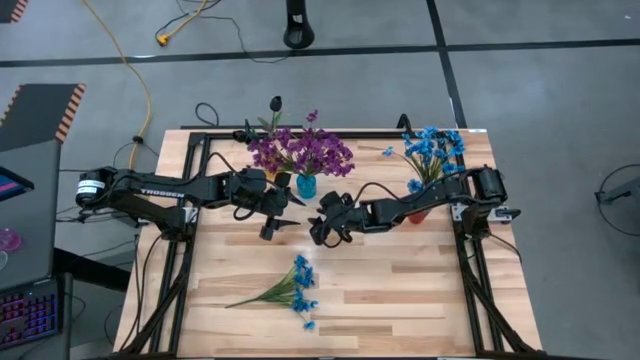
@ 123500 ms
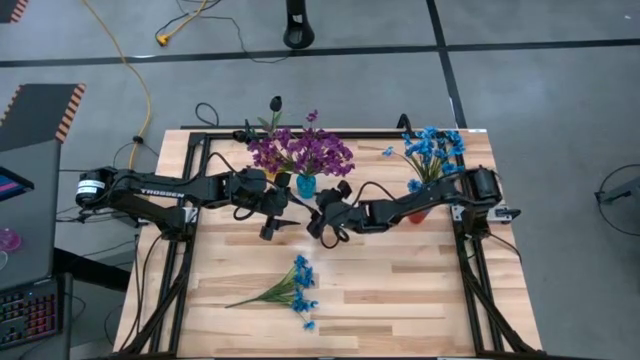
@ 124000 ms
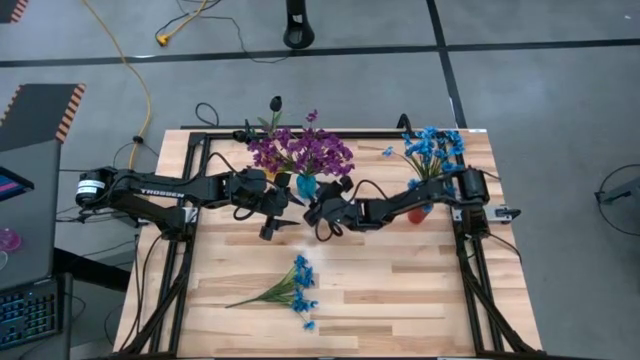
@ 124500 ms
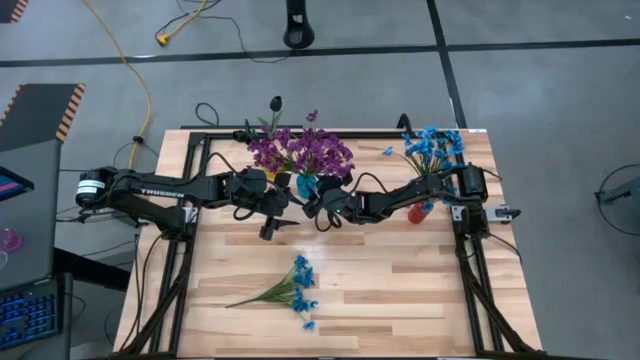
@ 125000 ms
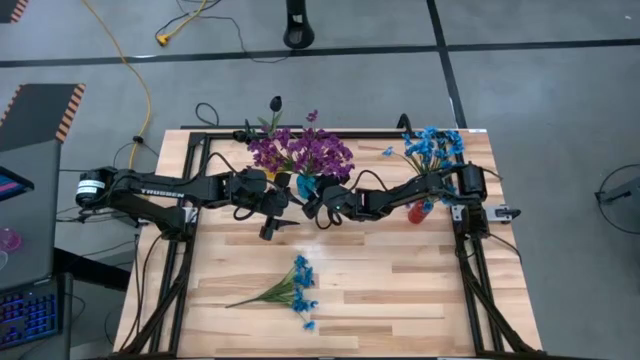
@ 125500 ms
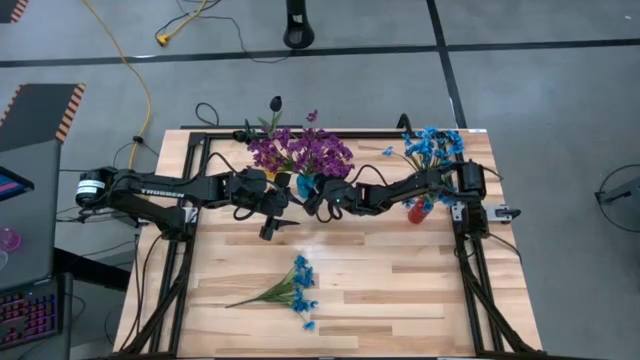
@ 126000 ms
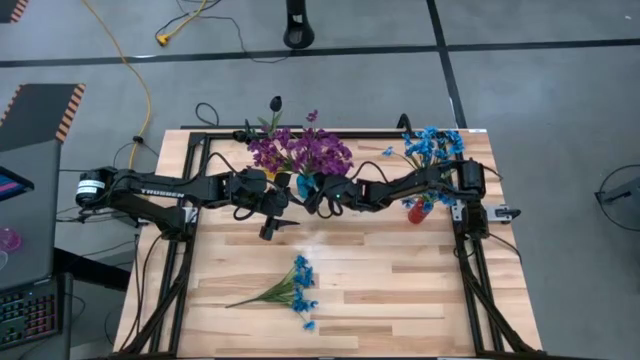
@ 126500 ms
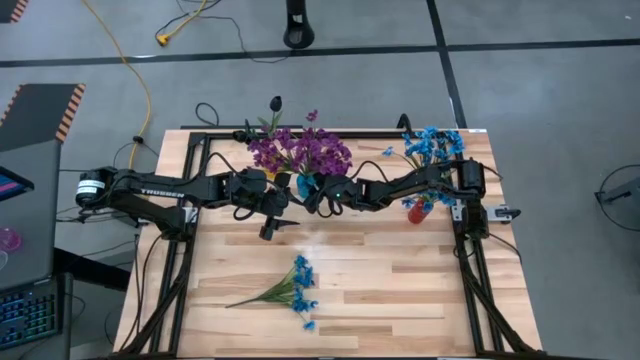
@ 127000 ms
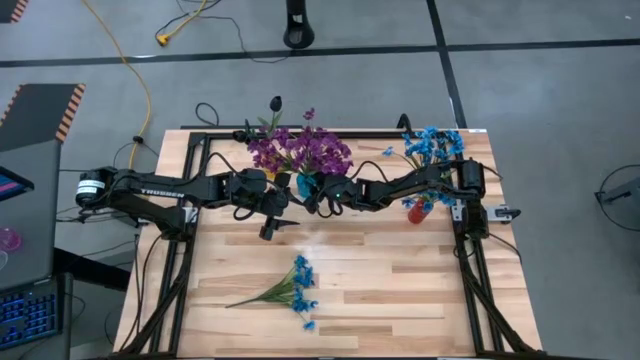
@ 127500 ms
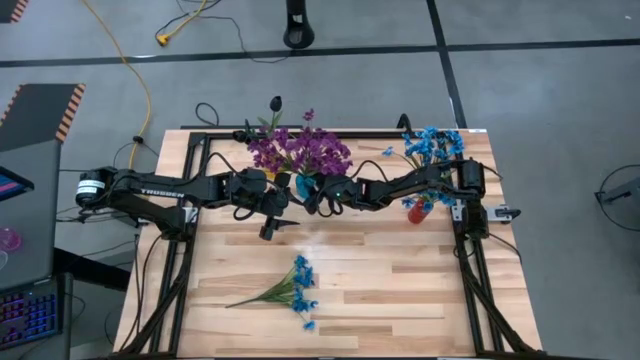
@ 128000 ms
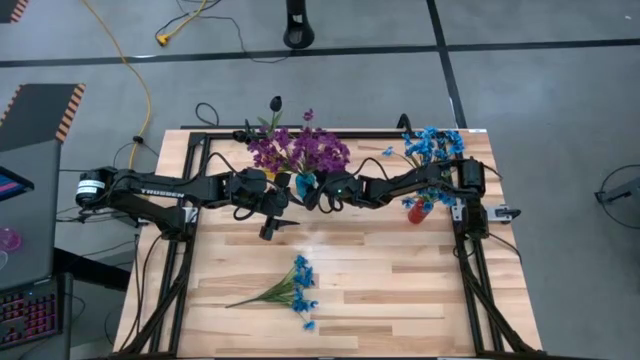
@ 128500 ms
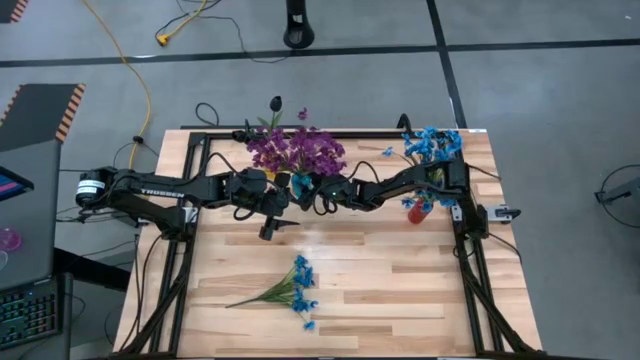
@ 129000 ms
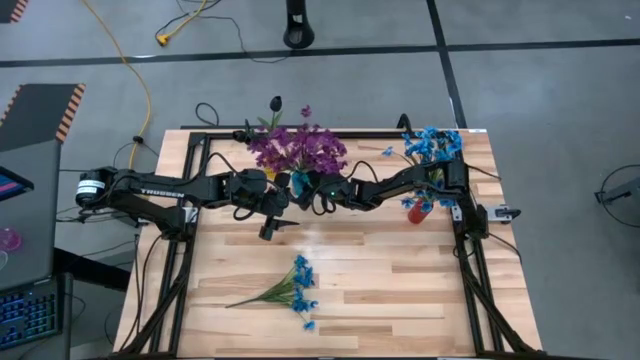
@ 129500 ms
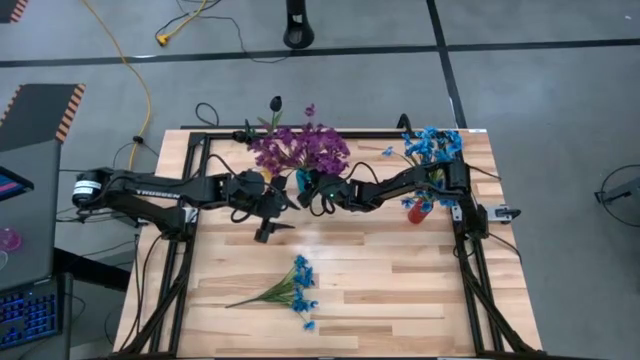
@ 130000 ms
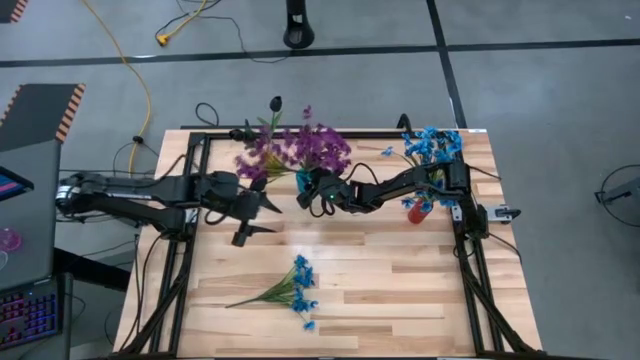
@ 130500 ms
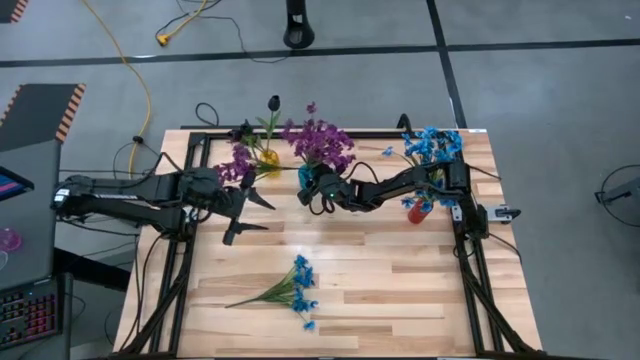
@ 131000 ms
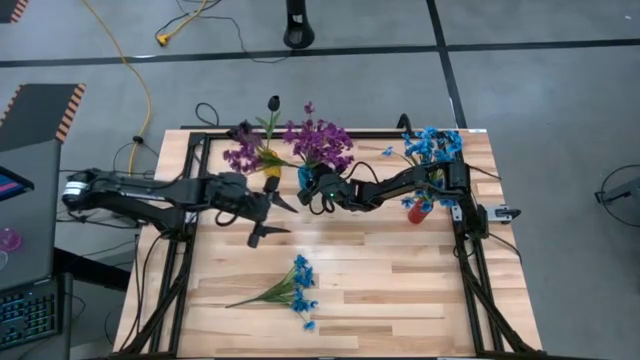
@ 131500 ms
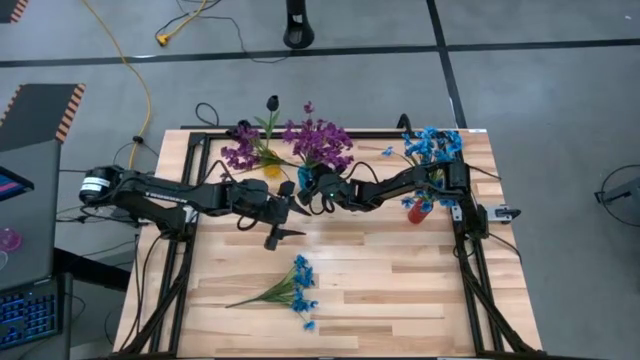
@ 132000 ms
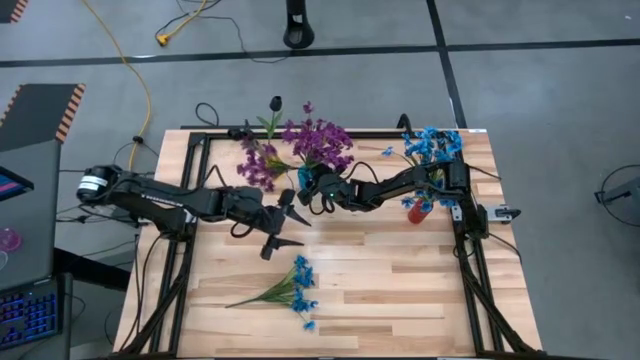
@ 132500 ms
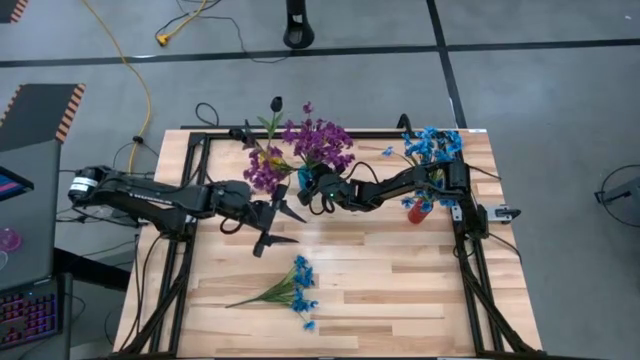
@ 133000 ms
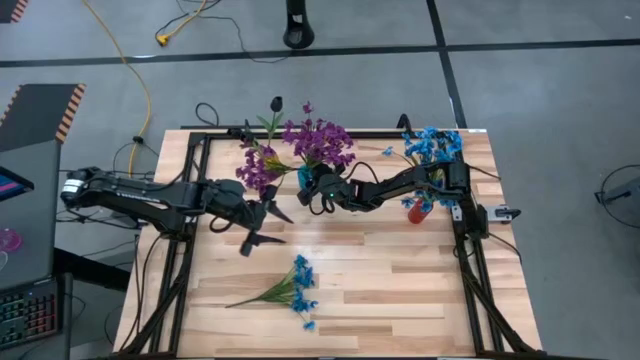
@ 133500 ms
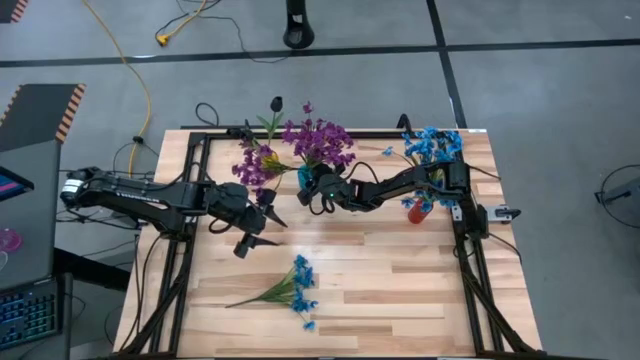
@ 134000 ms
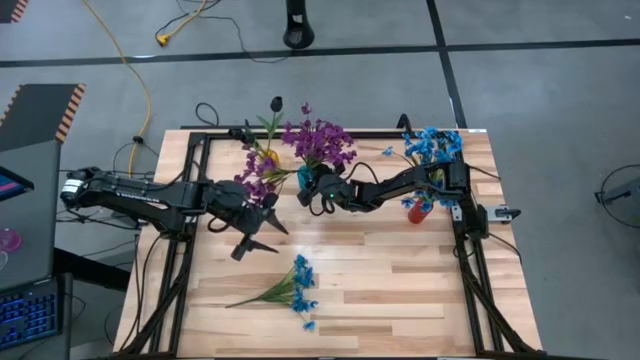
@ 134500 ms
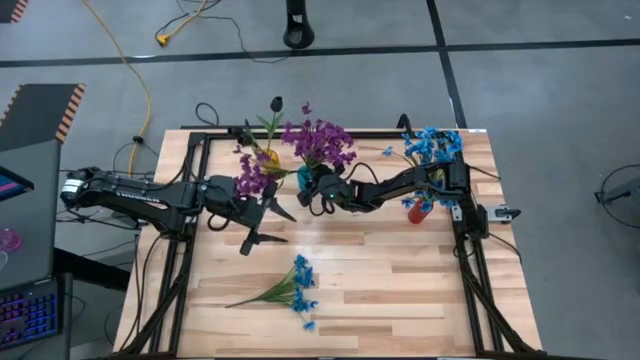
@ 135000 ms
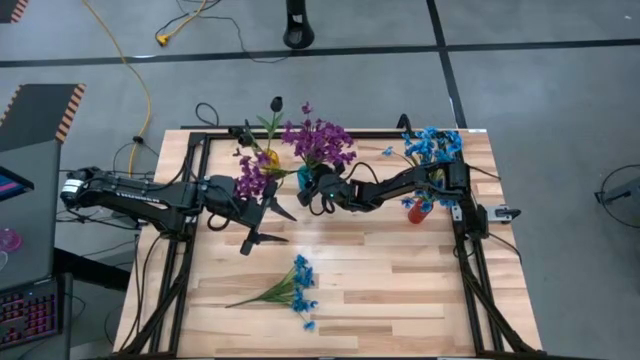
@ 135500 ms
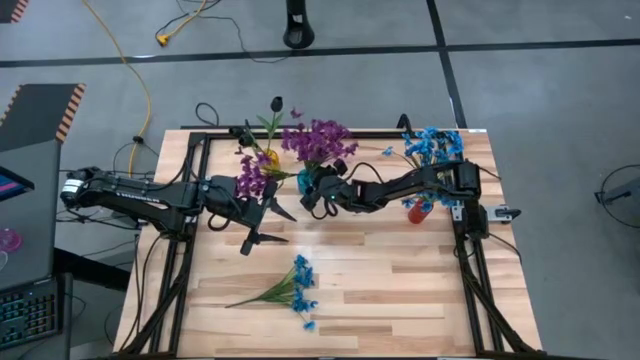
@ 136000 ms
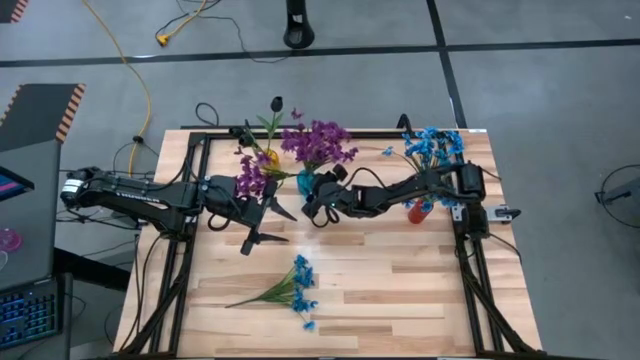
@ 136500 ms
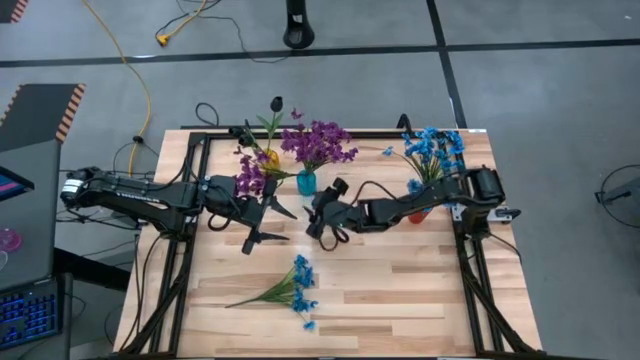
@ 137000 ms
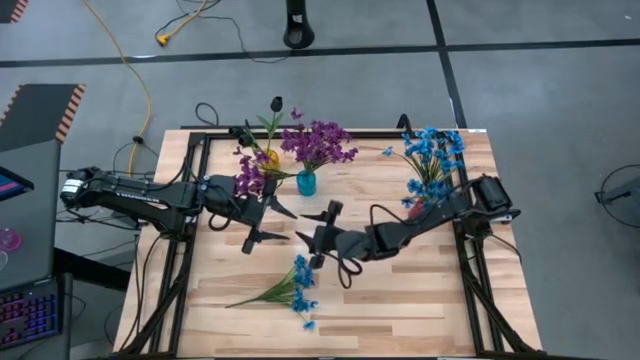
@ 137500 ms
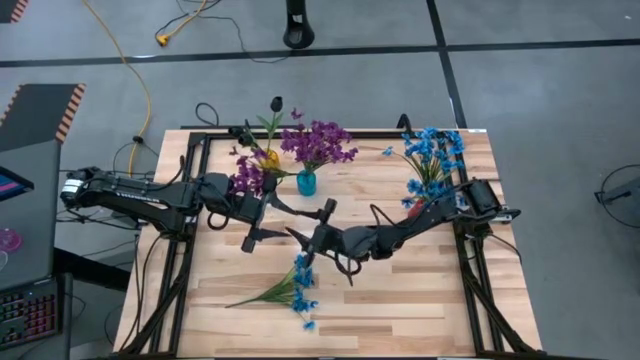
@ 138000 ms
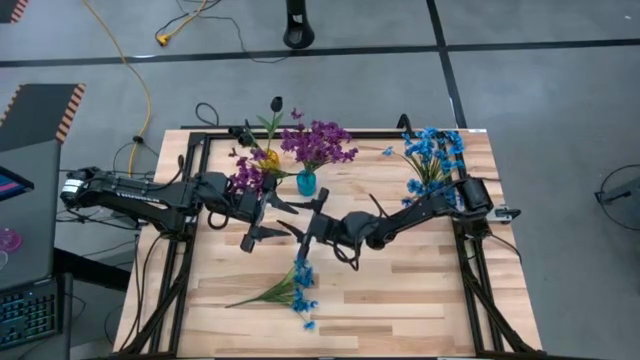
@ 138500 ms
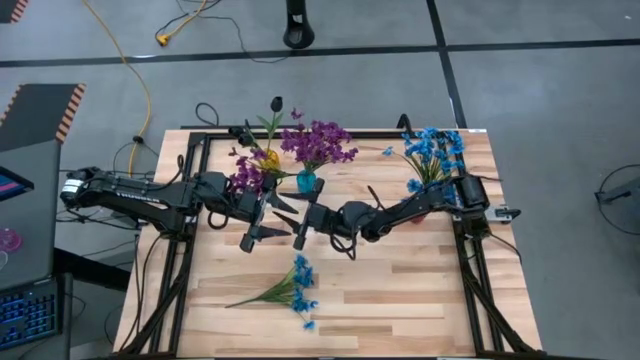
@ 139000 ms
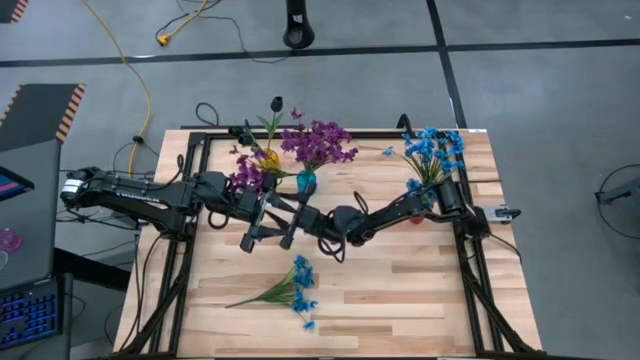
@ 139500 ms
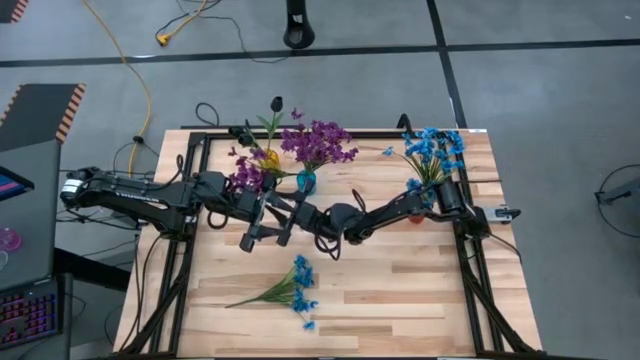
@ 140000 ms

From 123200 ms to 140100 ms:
Task: Sort flowers into vase by color
Put the violet flower into the blue vase
